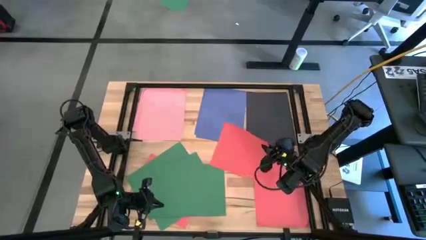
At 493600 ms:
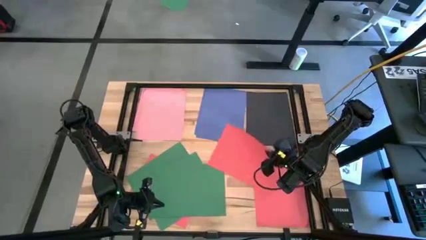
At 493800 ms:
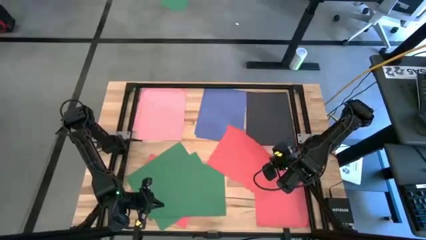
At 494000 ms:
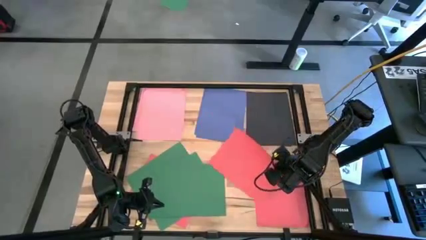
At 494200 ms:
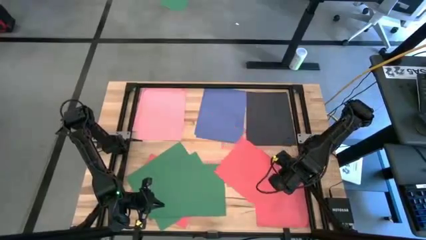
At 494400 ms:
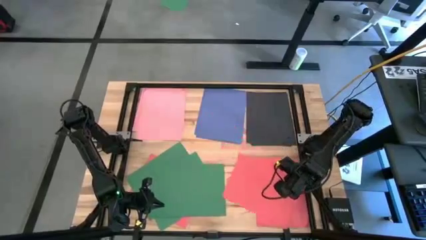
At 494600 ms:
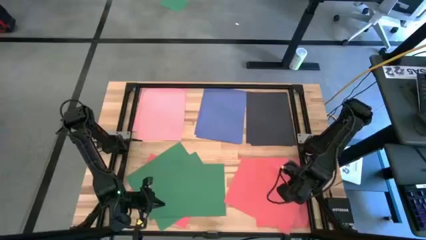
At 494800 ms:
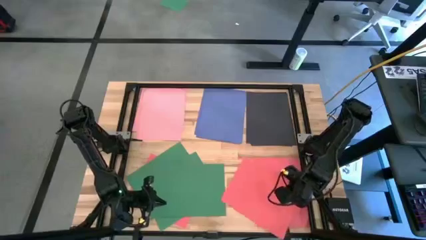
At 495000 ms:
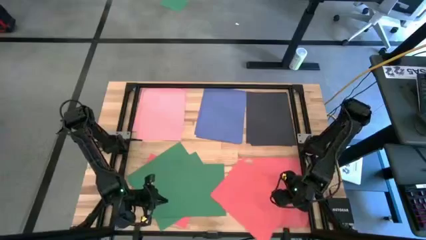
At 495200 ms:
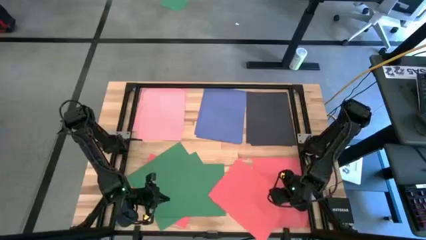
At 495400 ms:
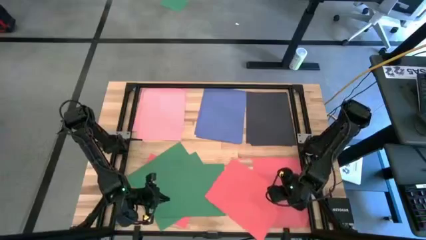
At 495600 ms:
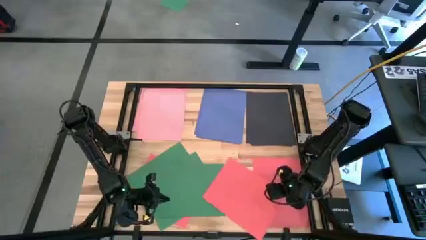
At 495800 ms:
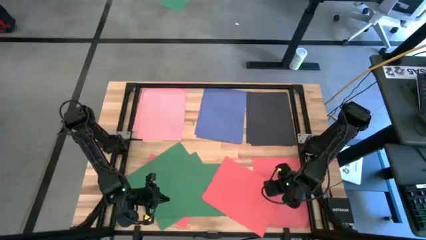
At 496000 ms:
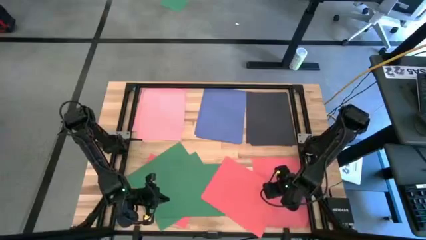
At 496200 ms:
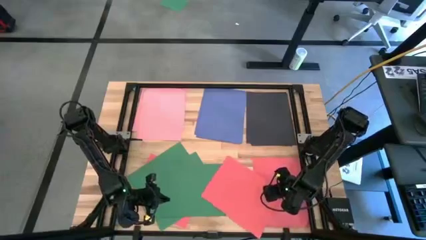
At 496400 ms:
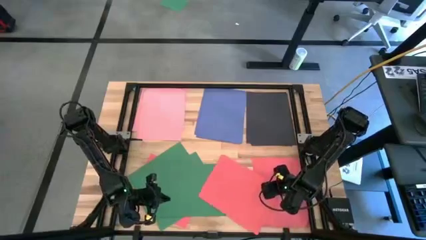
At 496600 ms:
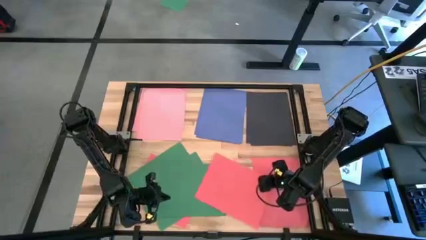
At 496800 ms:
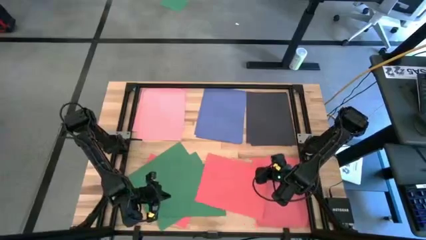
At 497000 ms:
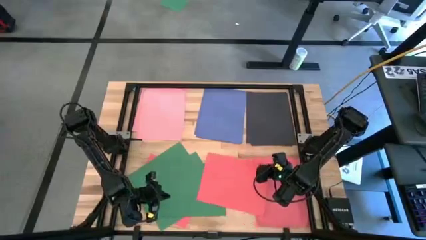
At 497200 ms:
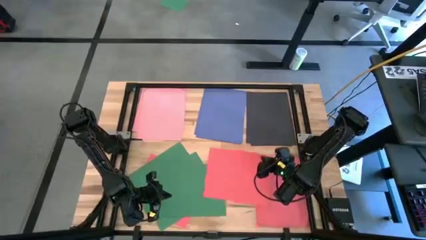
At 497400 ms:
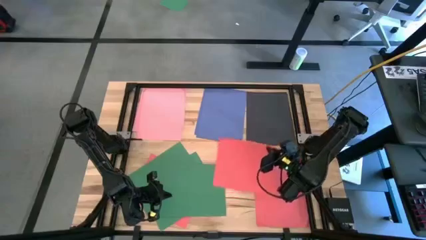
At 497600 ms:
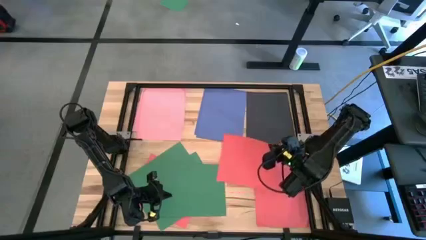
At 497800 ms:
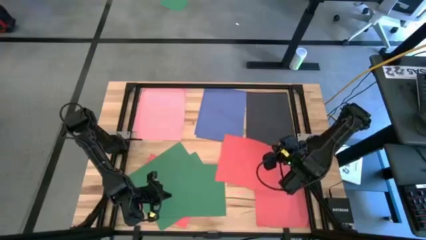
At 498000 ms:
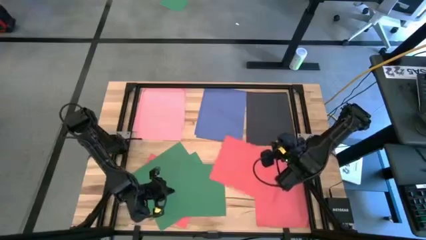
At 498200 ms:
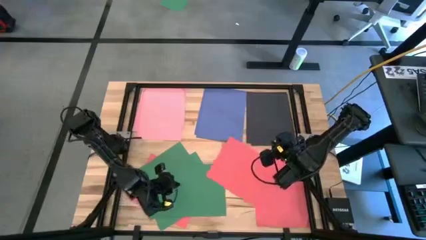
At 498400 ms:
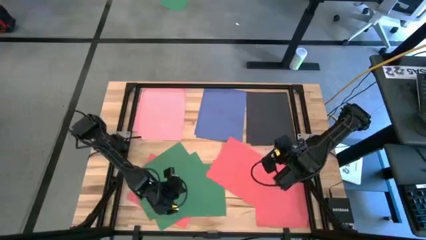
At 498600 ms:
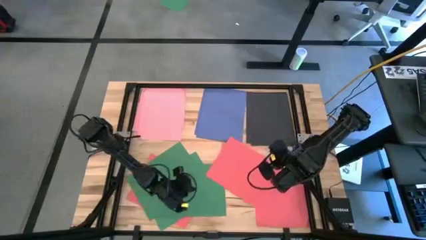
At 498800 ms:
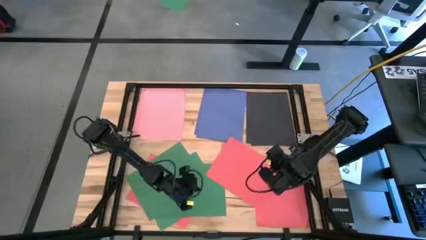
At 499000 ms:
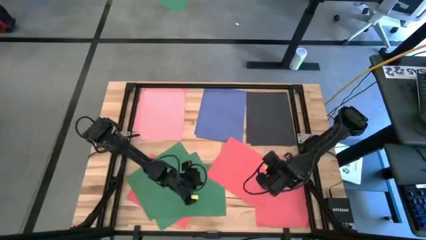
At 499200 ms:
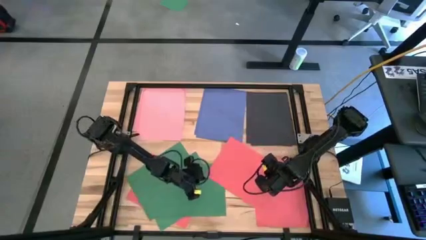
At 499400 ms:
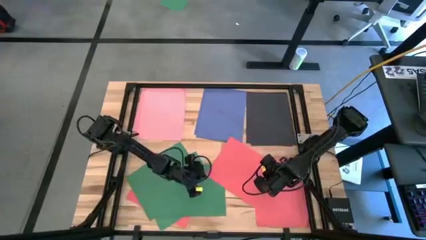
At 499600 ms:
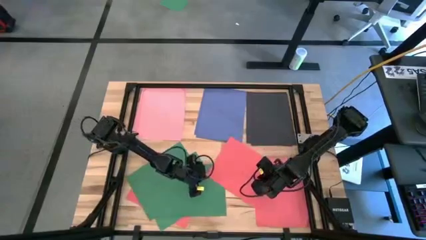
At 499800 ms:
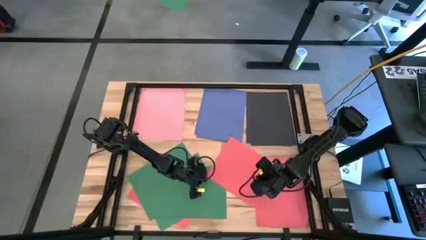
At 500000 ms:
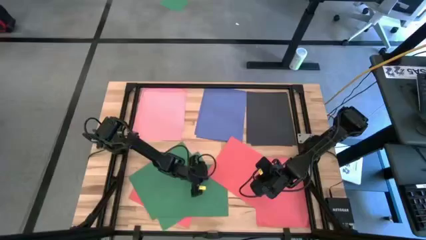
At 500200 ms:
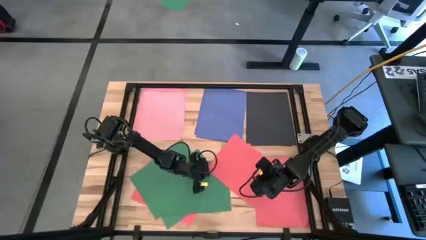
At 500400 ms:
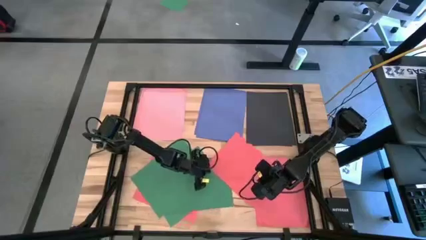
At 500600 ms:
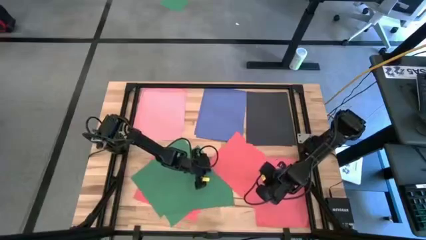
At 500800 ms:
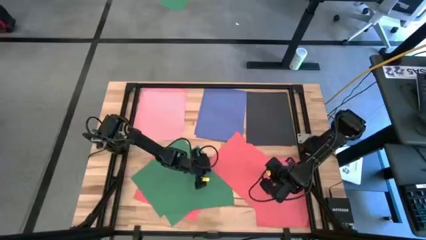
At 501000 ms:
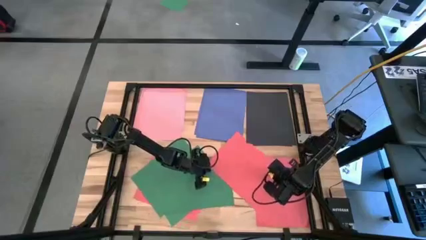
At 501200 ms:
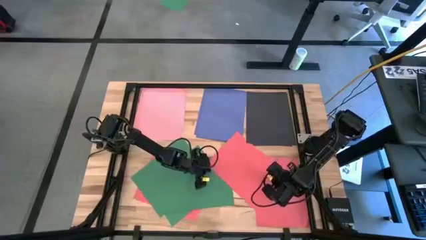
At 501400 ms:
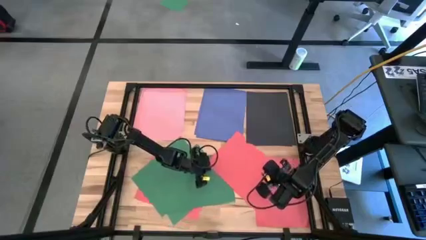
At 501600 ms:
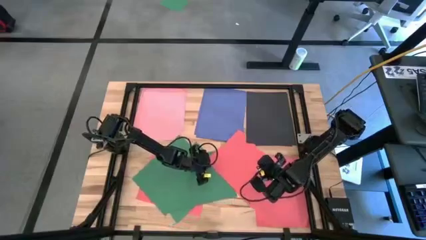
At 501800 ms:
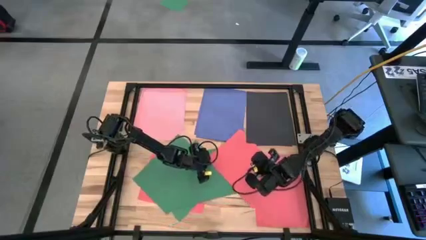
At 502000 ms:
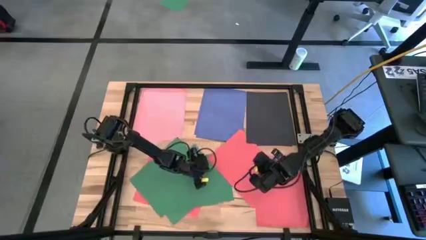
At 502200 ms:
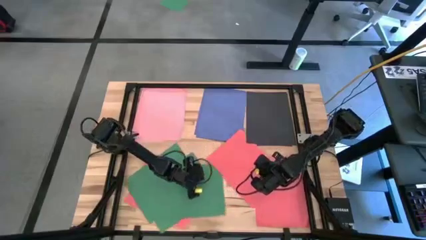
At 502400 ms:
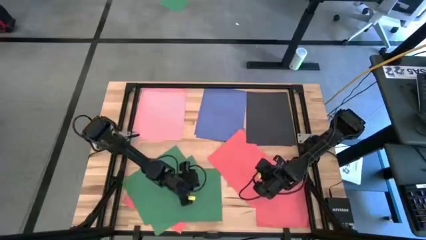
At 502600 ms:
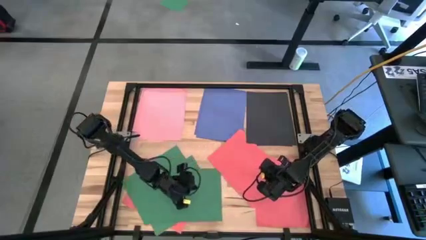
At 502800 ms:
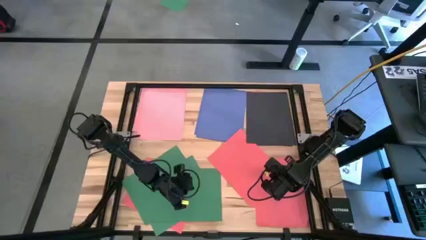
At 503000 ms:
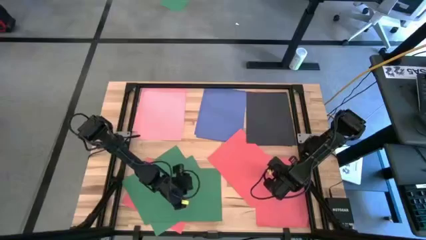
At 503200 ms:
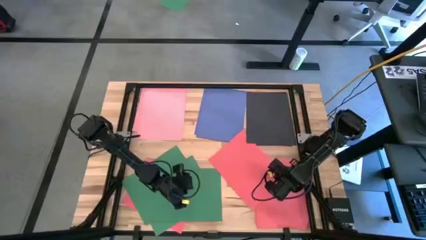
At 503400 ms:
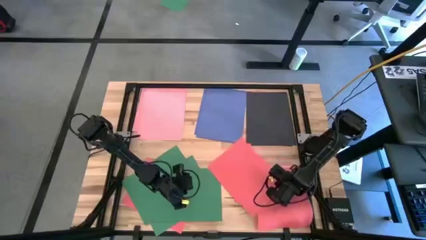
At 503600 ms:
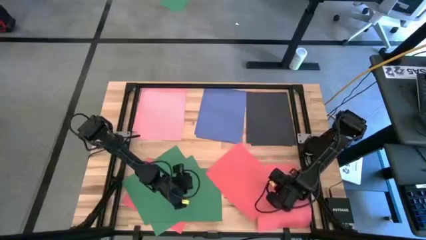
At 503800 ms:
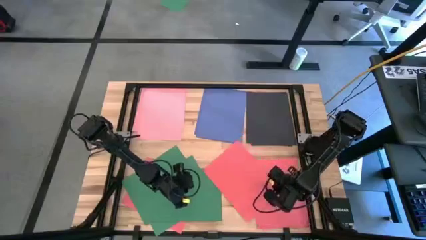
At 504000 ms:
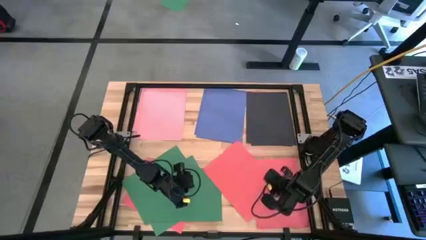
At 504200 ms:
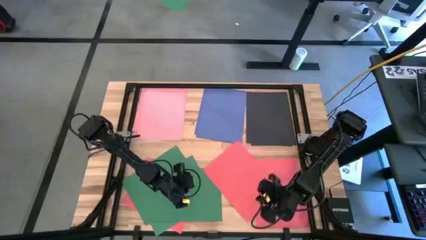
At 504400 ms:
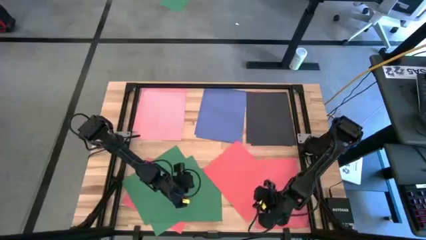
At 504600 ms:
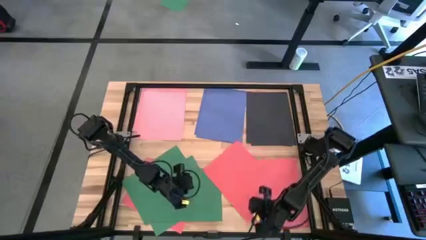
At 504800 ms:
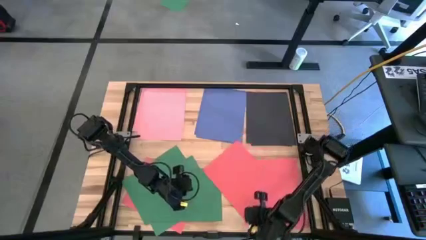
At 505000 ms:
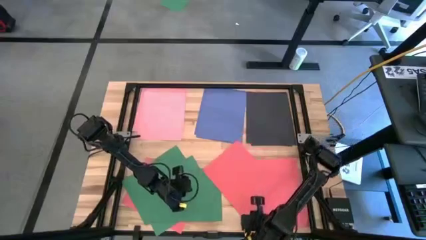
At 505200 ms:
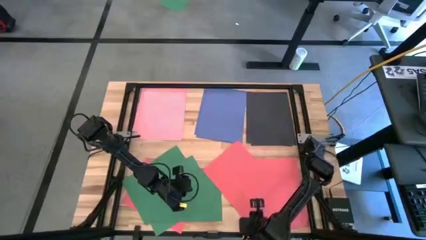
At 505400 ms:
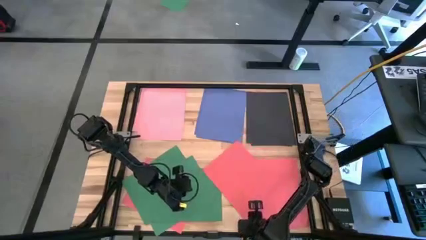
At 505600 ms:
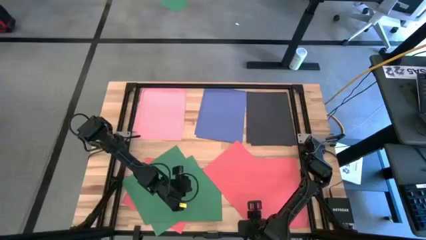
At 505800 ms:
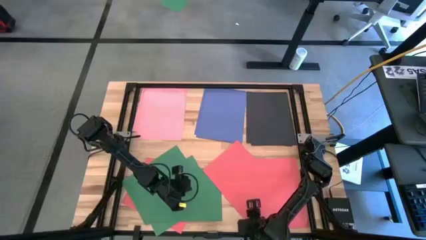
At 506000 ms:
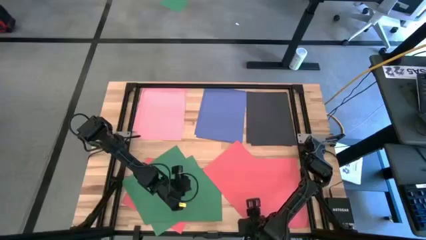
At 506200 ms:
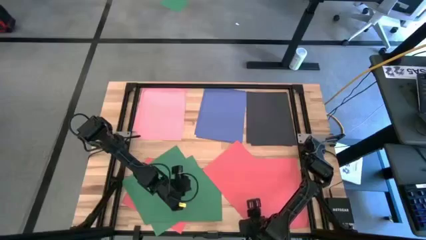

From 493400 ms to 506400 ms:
Task: Organize paper
Stack the red paper on top of the other red paper on the table

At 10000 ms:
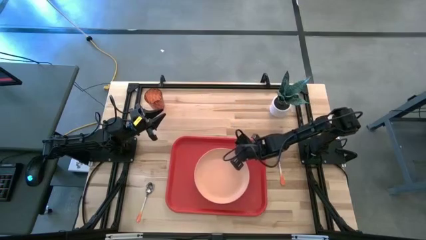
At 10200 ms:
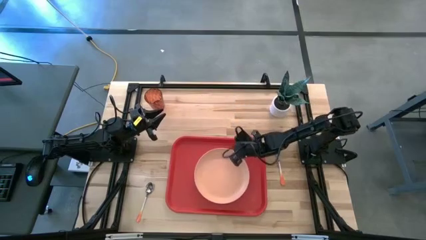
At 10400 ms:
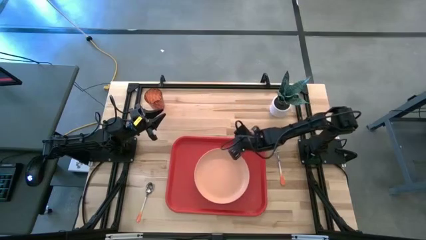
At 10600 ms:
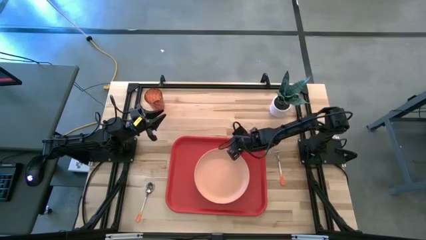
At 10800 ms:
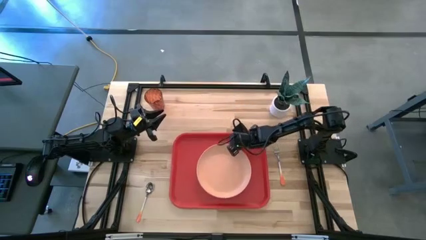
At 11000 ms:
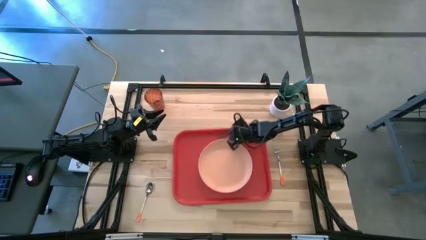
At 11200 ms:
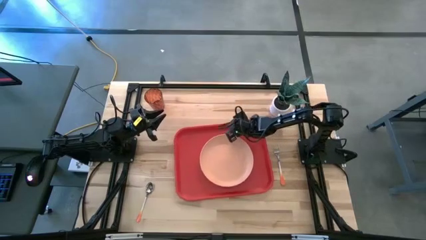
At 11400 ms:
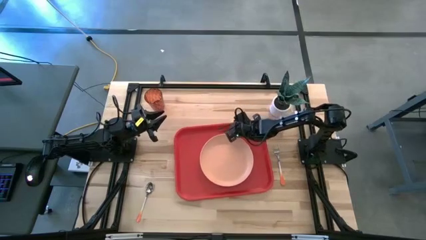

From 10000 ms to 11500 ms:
Task: Pick and place plate/cup/fork/spoon on tray
Adjust the red serving tray
